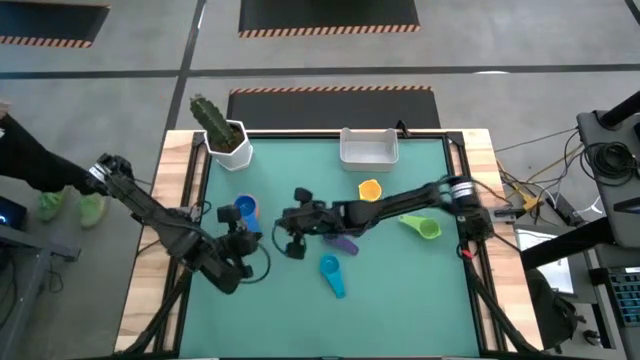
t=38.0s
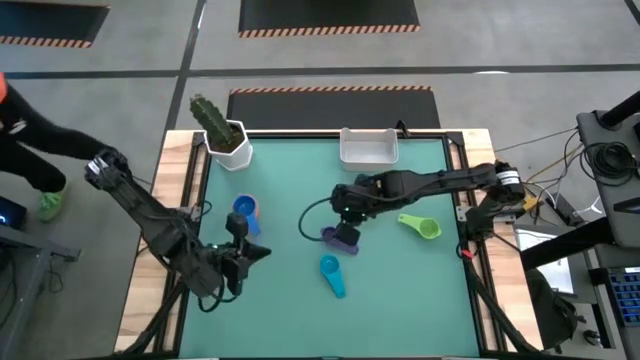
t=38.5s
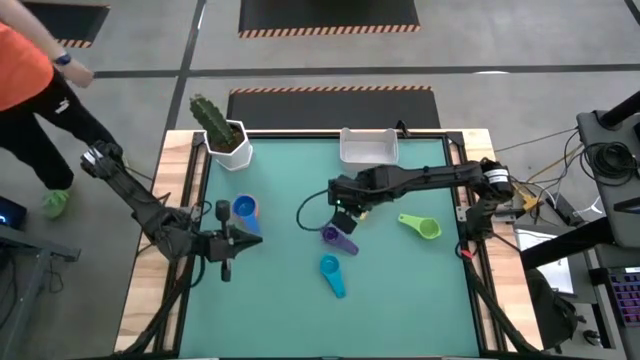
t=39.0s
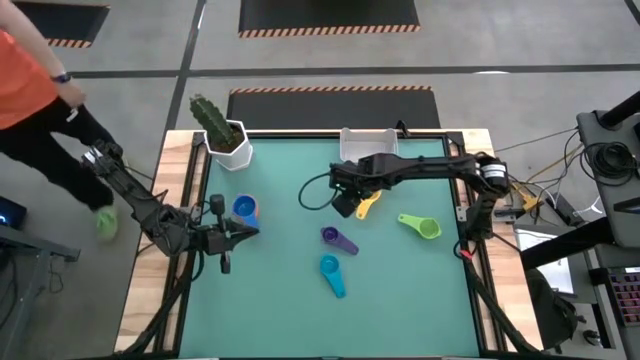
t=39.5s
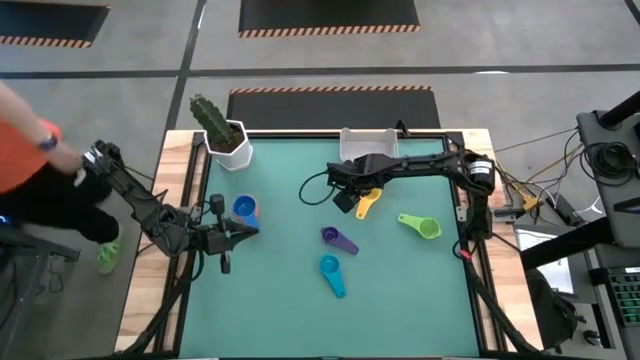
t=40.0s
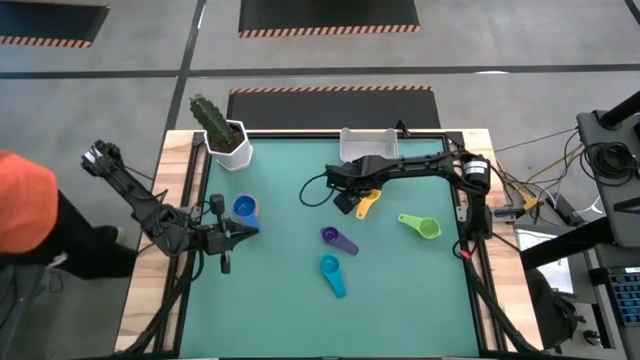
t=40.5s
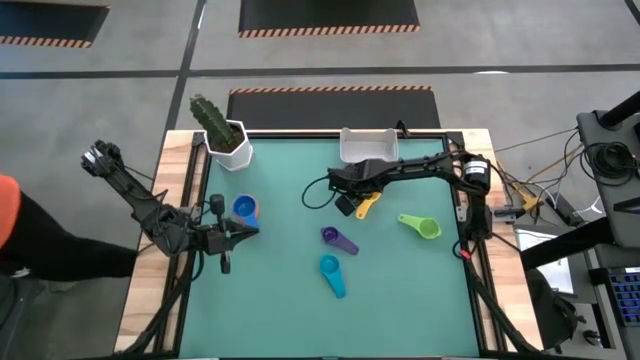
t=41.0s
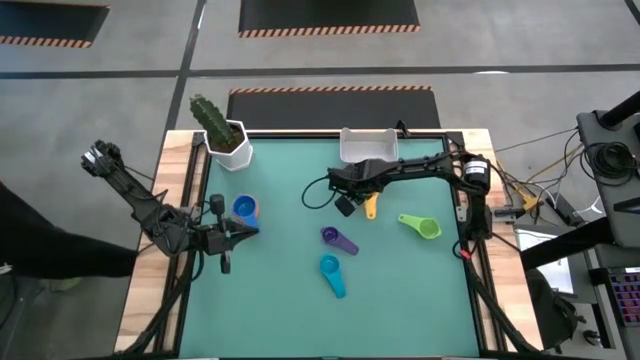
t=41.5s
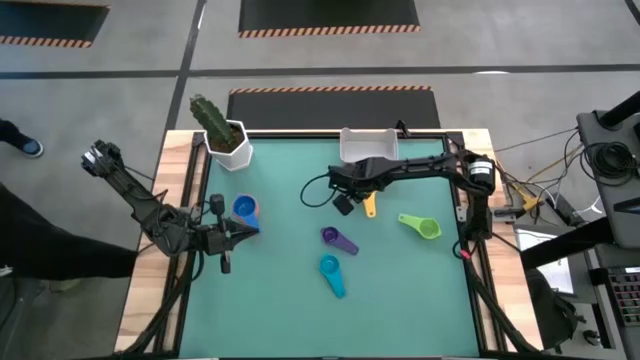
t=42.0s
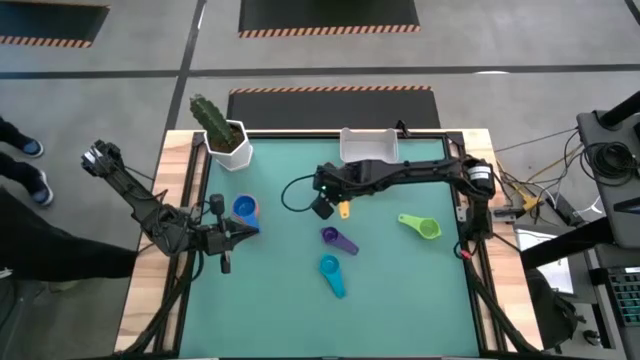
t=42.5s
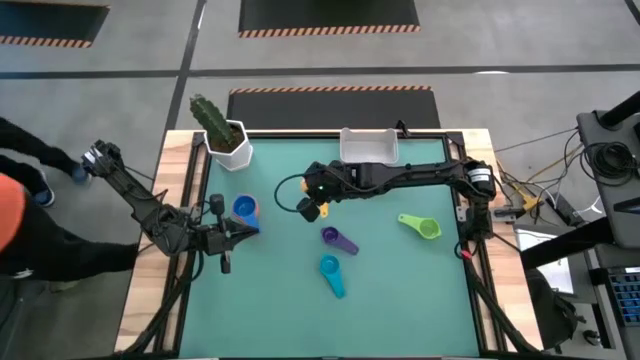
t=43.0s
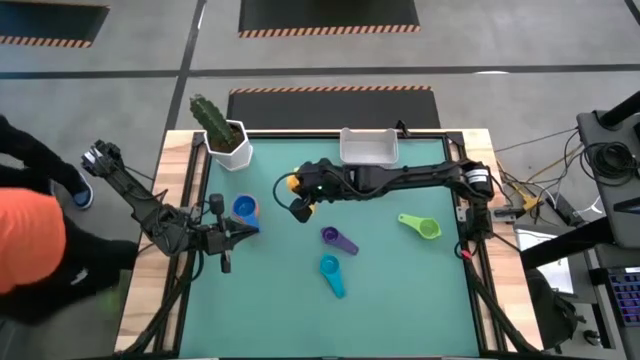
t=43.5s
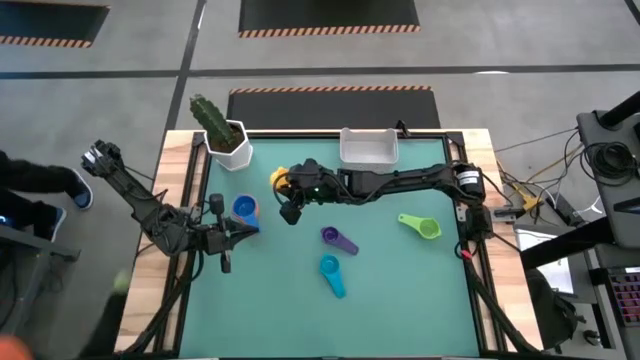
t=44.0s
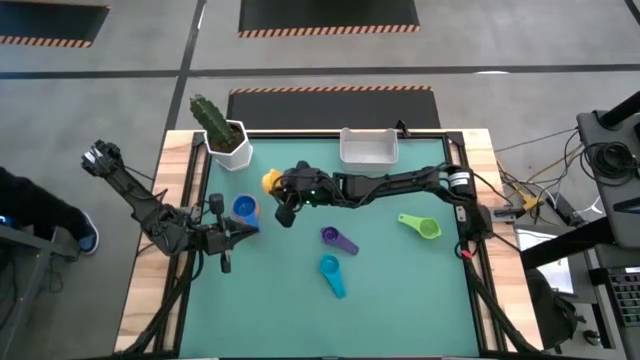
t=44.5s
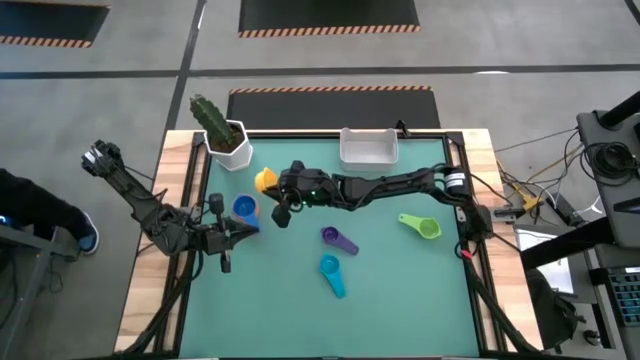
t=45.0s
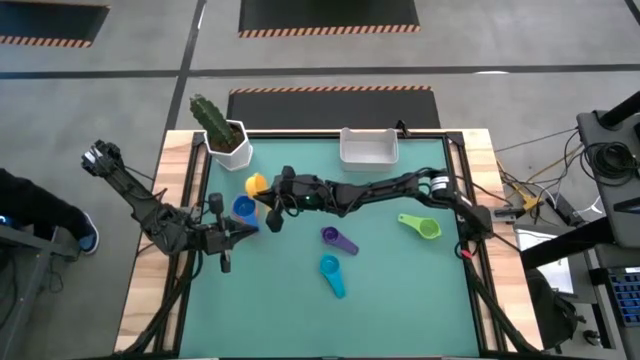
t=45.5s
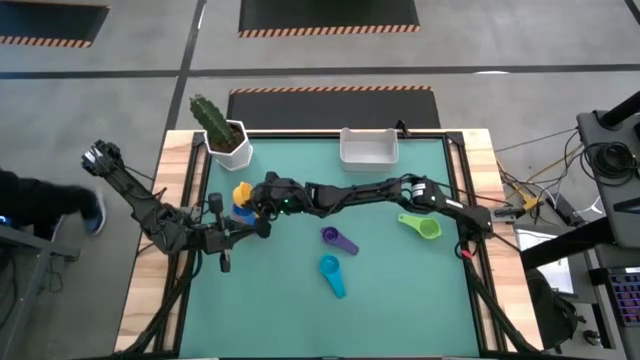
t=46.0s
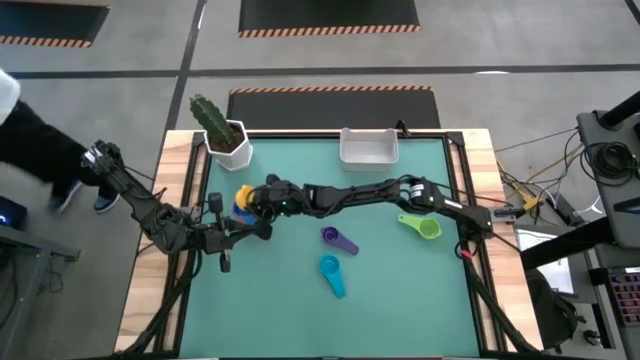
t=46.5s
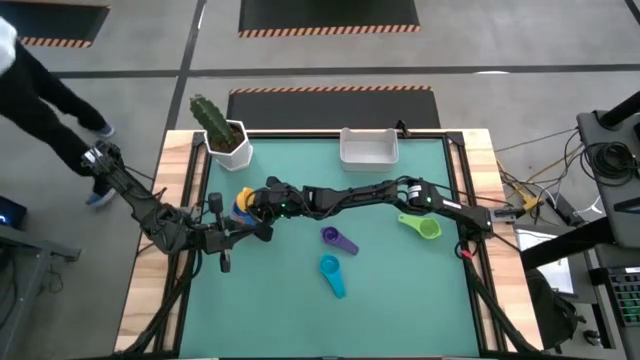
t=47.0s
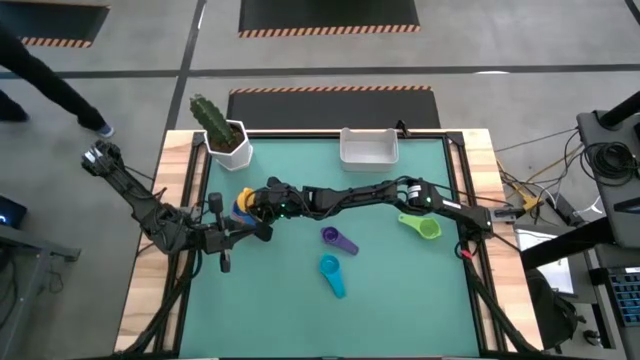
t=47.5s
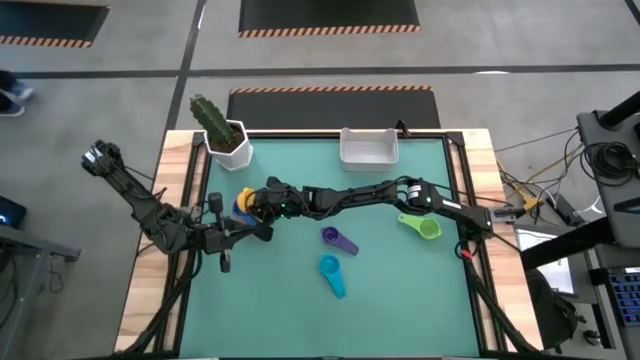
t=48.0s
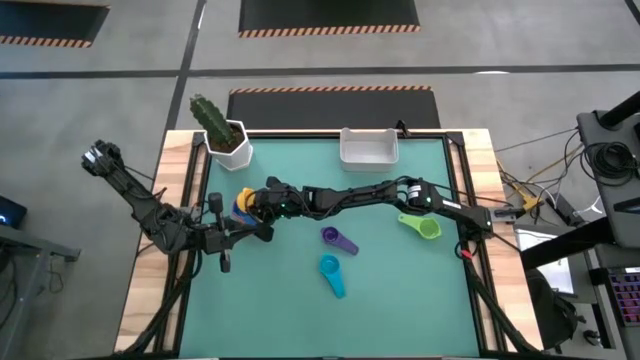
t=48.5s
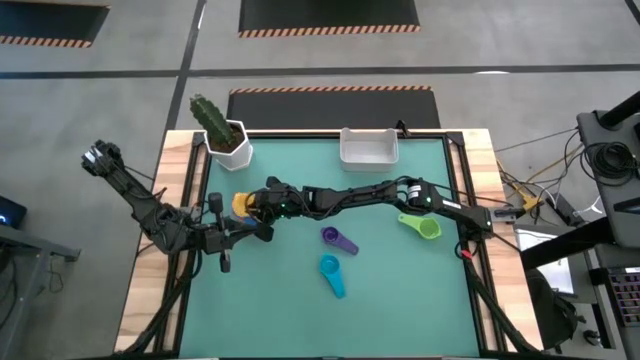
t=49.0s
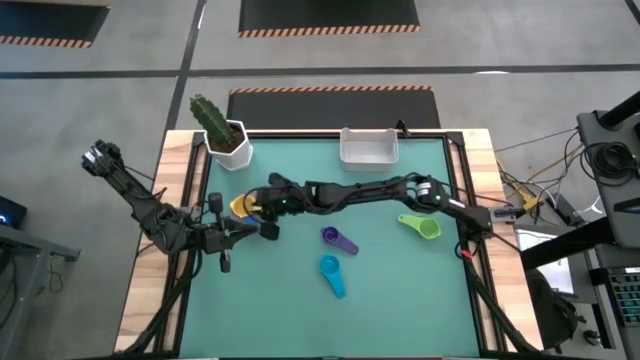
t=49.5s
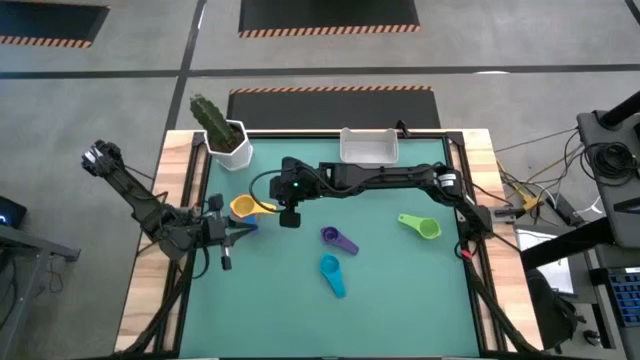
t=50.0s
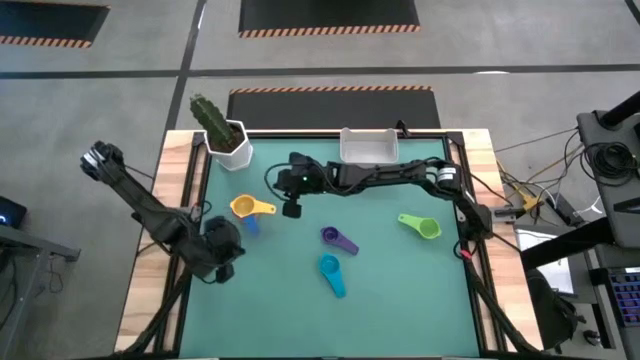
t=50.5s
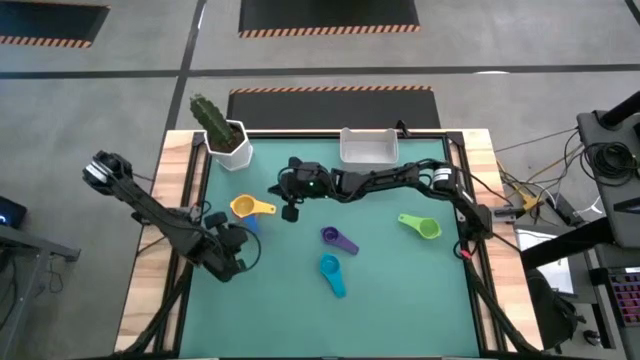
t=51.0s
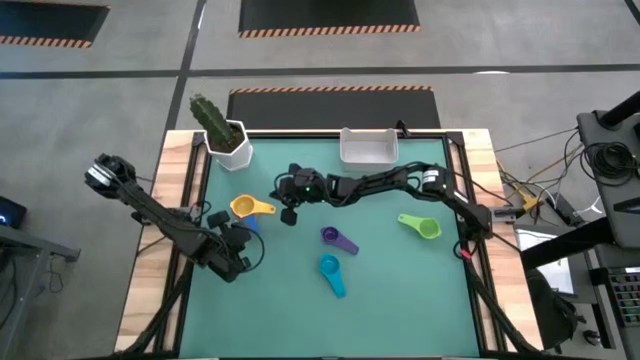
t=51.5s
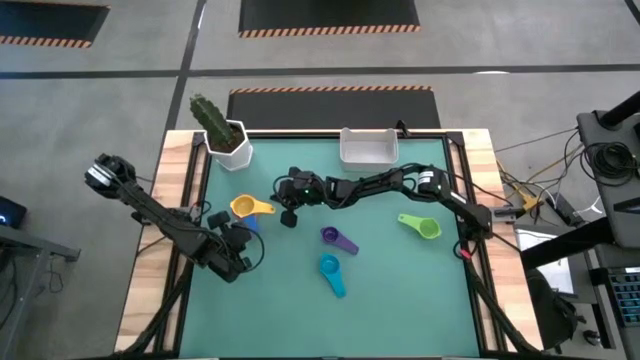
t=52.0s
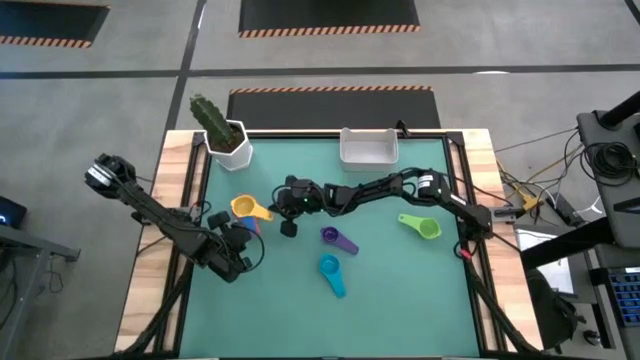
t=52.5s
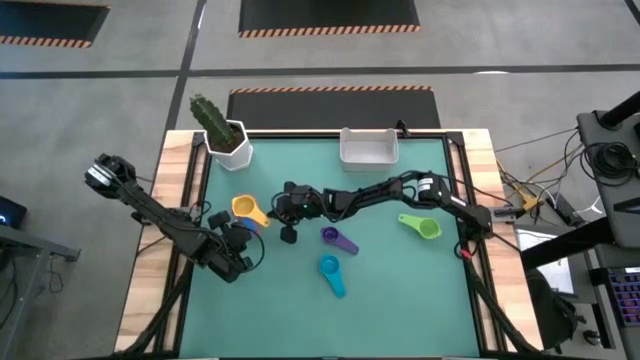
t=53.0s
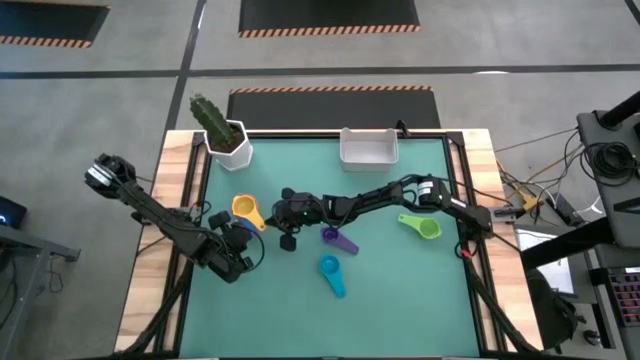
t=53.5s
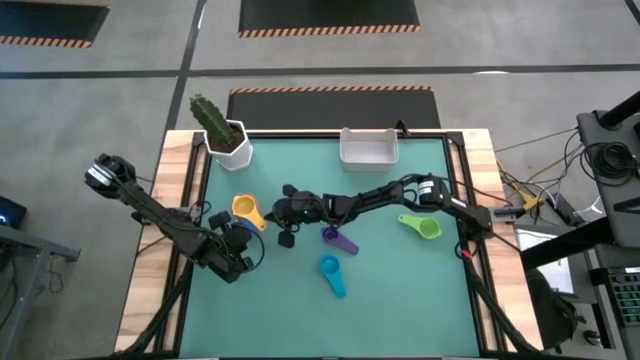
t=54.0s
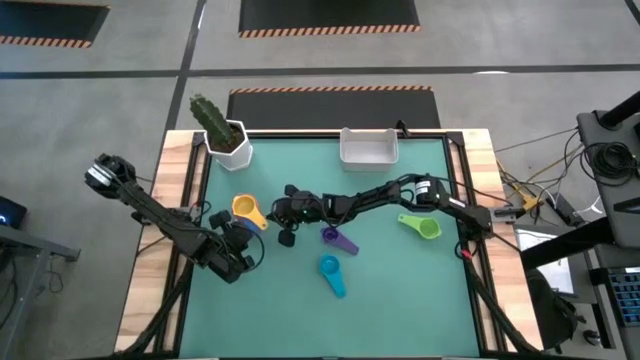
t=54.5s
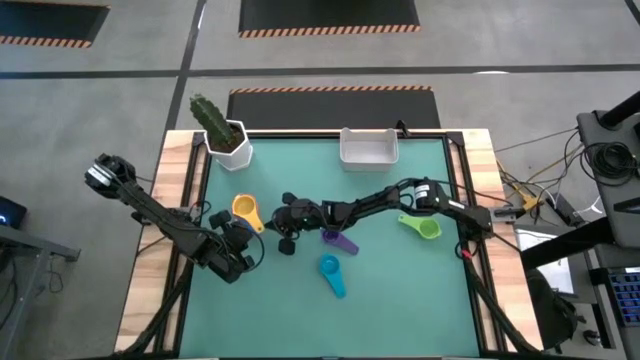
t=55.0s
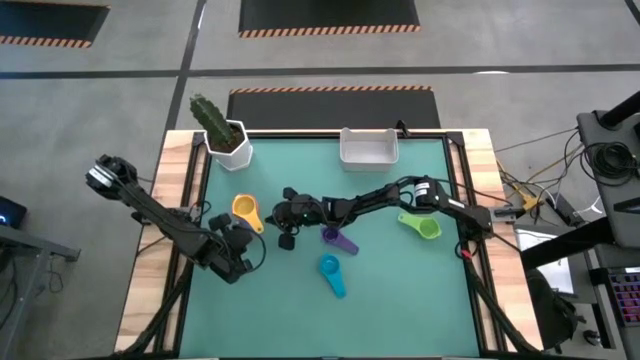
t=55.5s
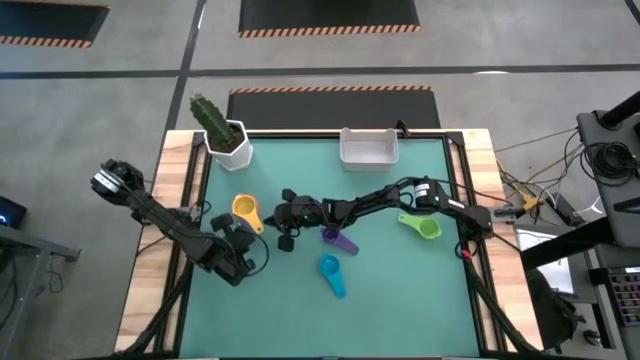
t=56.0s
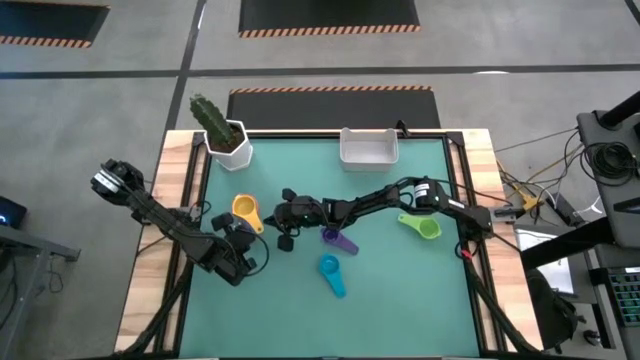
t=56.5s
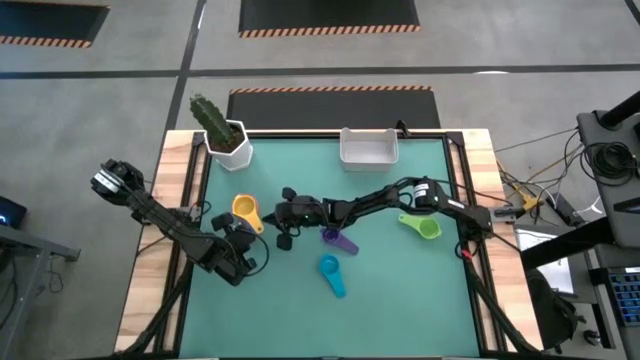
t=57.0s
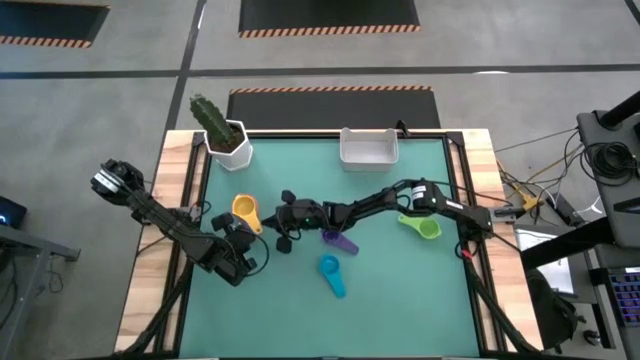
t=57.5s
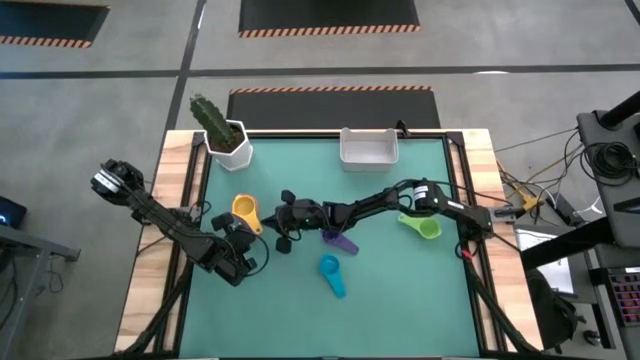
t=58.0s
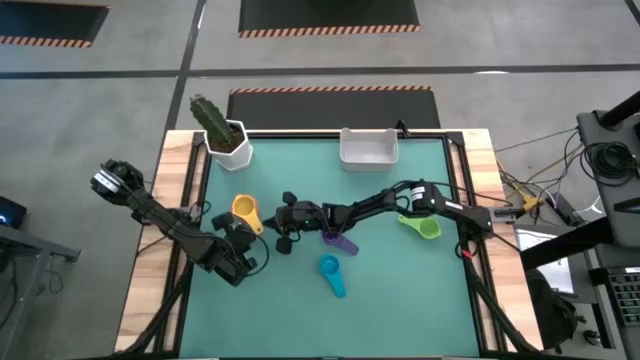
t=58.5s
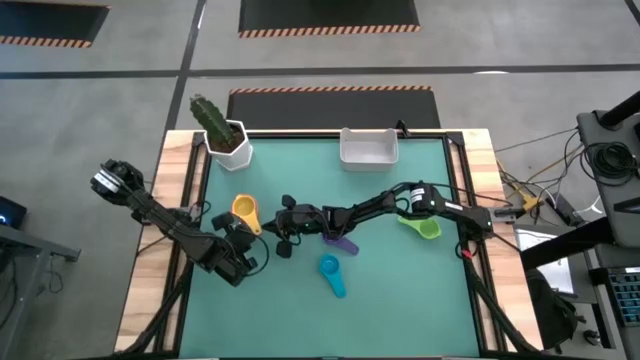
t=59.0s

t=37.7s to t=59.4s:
Task: Nest measuring cups in basket
Stack the yellow measuring cup on top of the blue measuring cup
